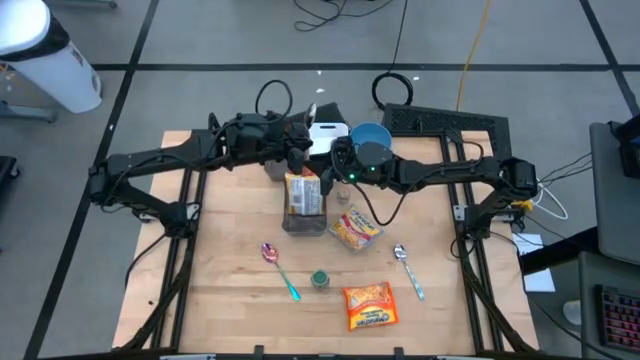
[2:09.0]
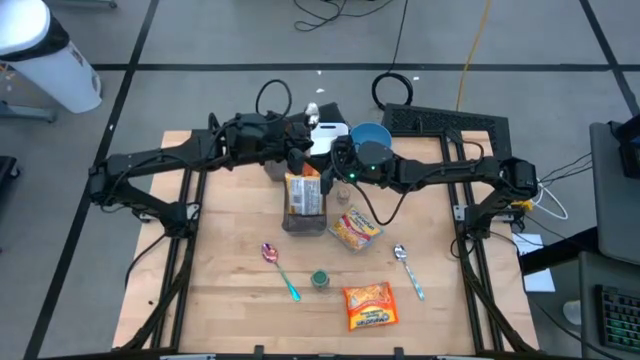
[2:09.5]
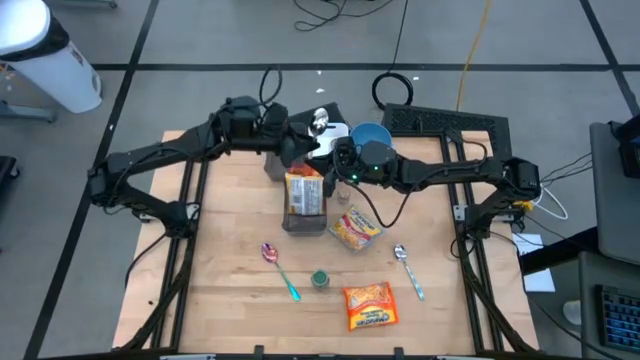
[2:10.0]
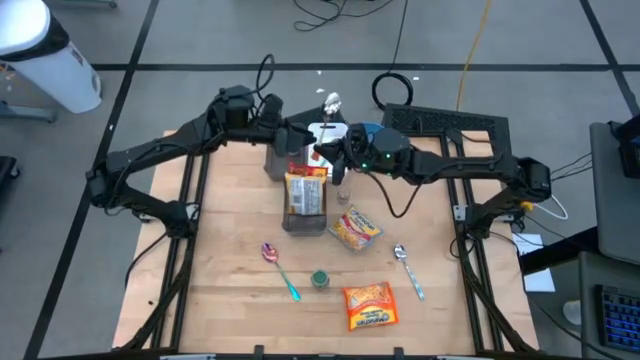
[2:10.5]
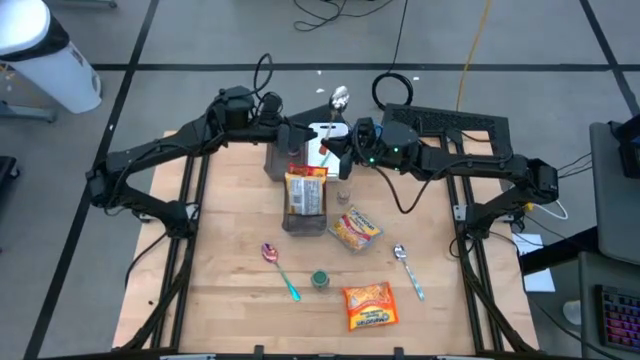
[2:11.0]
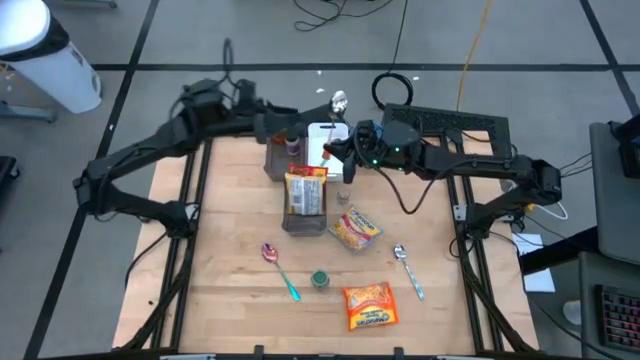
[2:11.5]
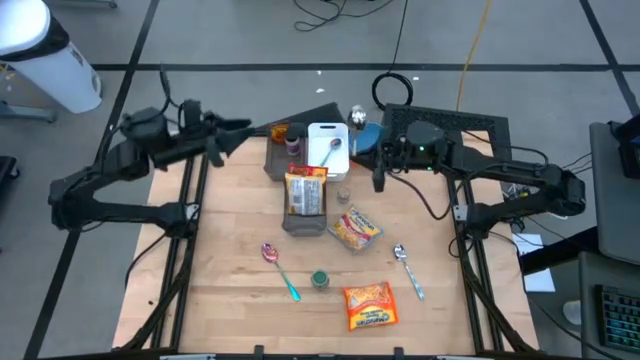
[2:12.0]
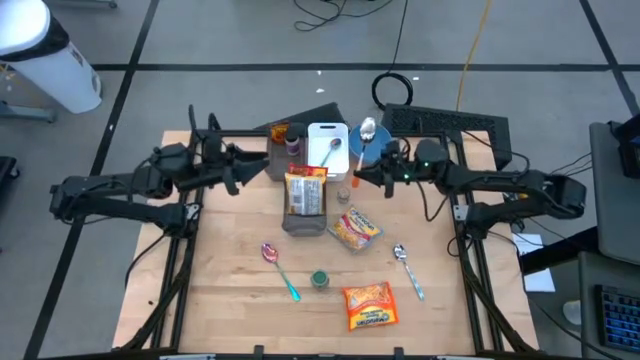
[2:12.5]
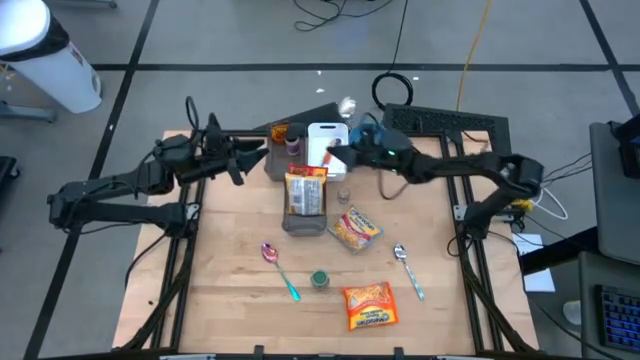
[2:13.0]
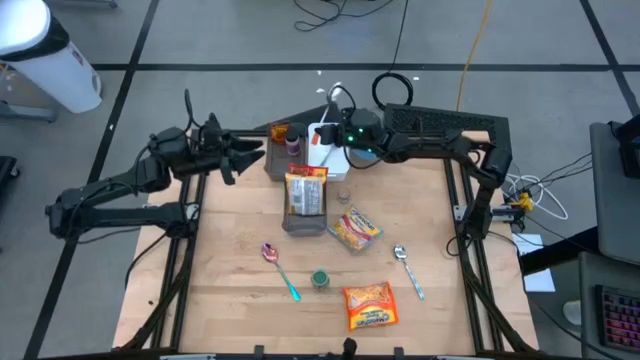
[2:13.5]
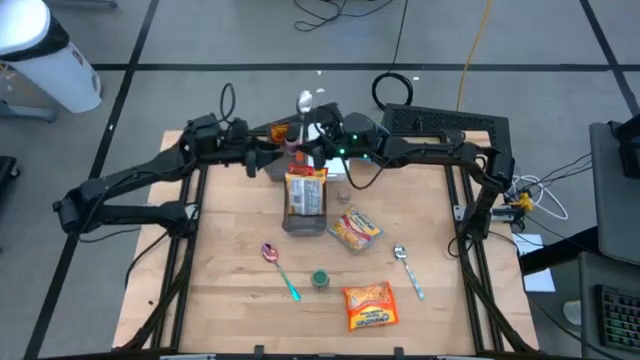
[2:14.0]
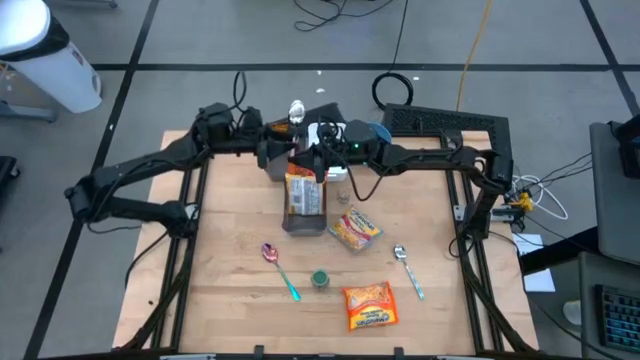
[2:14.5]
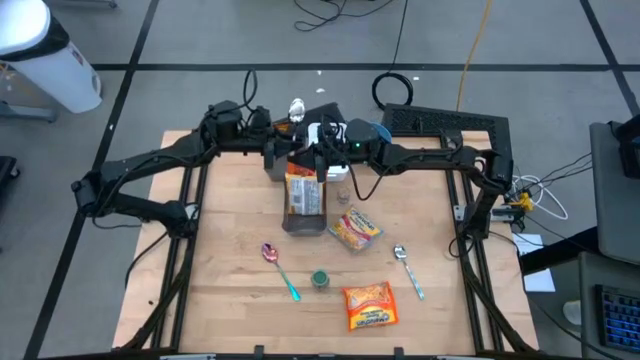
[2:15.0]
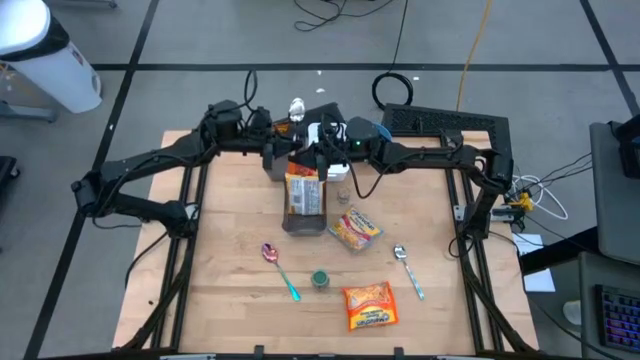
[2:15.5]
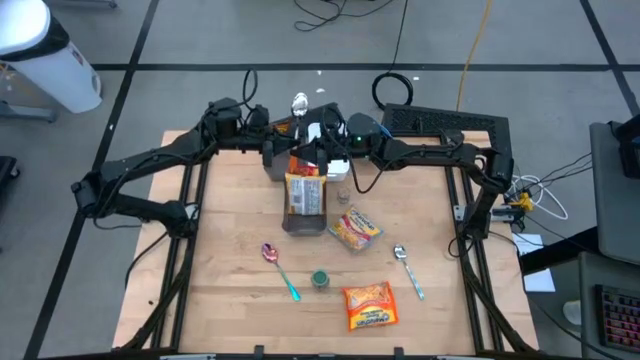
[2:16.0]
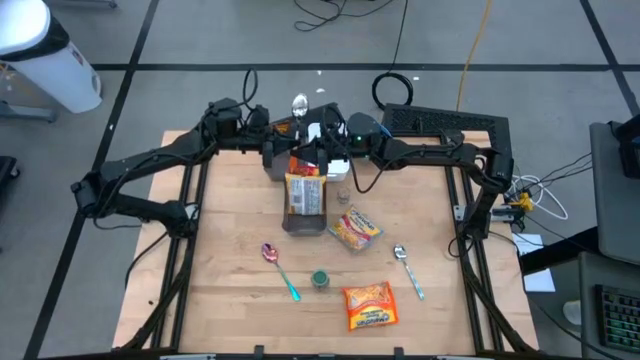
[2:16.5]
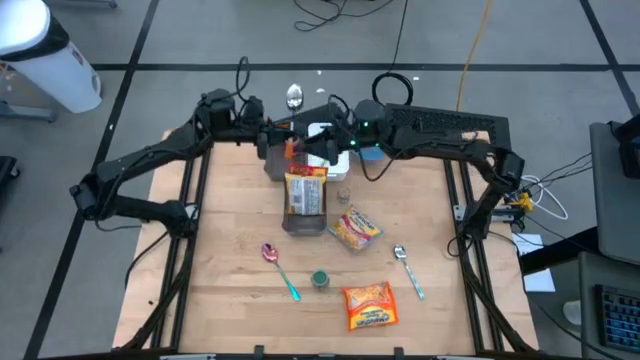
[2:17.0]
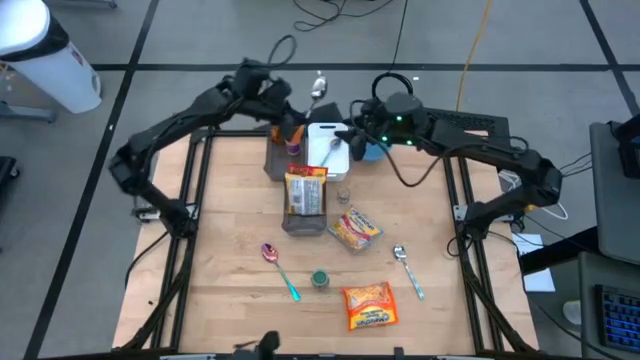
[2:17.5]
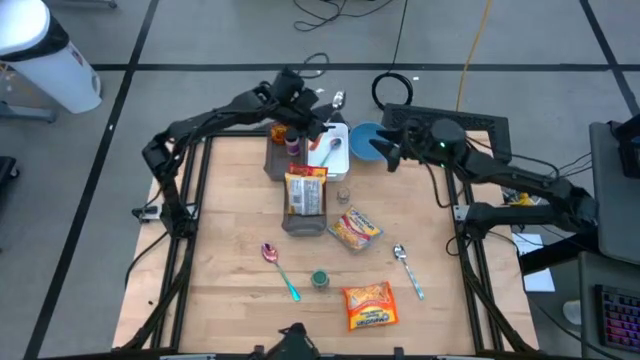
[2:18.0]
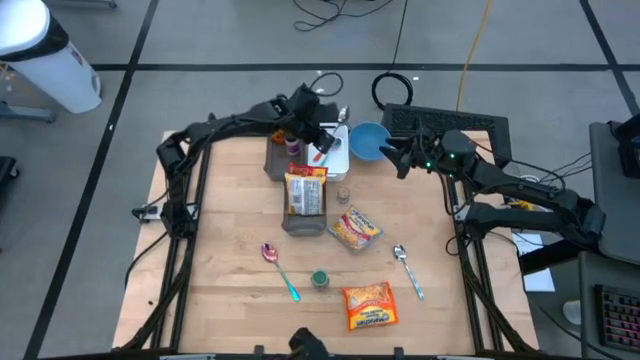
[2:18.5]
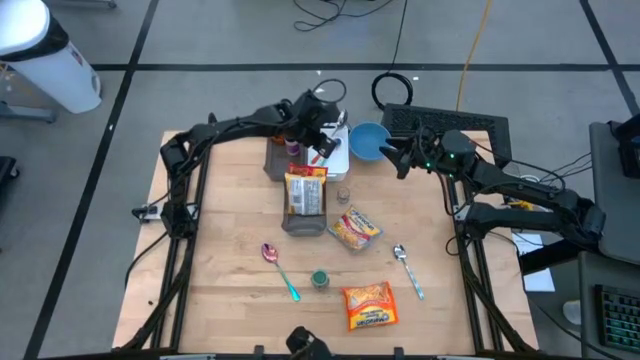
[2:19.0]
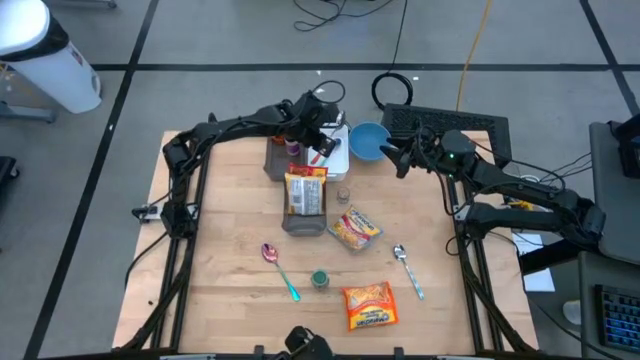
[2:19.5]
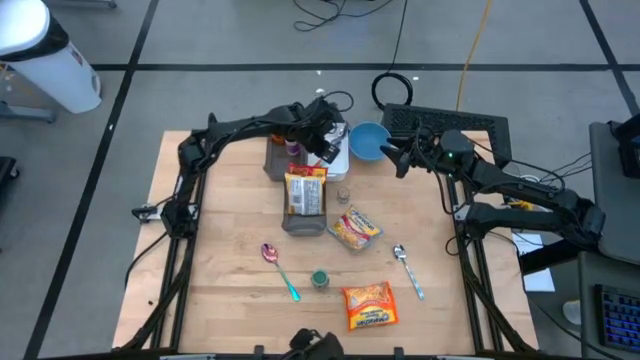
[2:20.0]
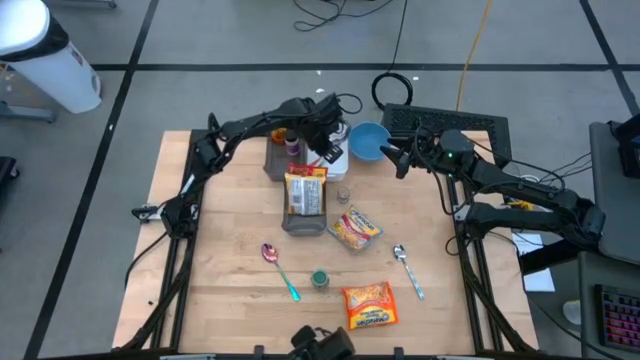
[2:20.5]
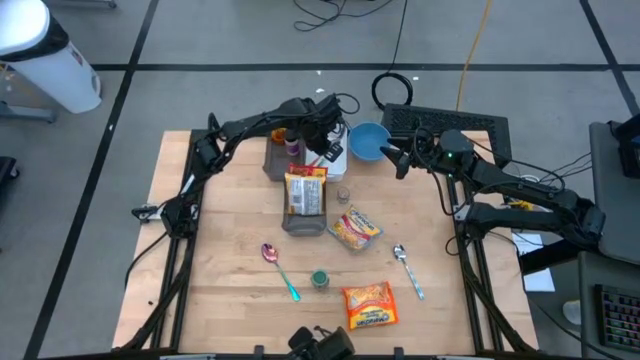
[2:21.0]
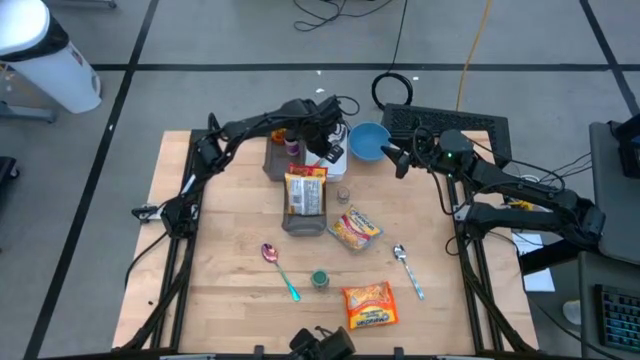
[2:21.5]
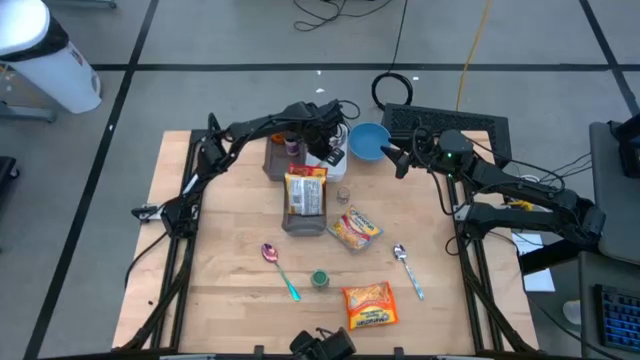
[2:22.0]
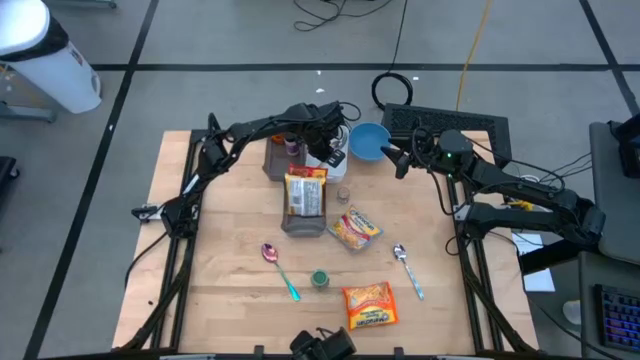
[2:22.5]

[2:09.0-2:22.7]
Task: Pick & Place Food Item
Put the orange spoon into the white bin

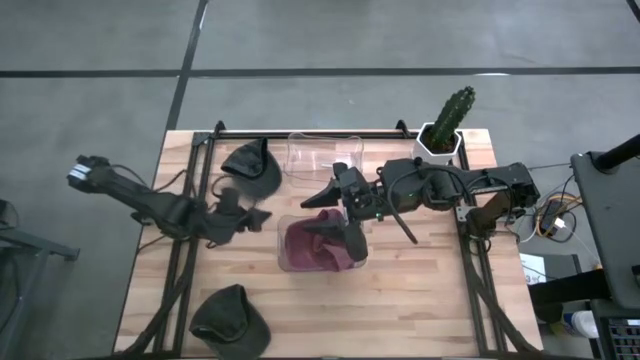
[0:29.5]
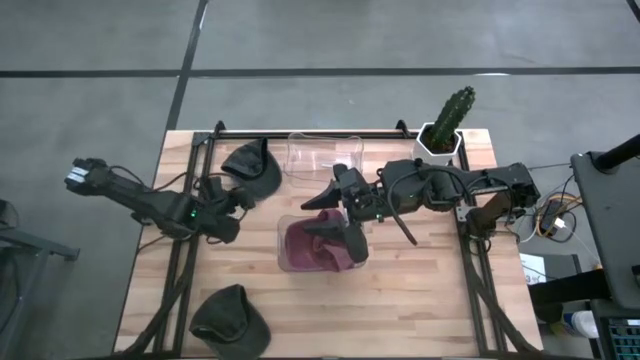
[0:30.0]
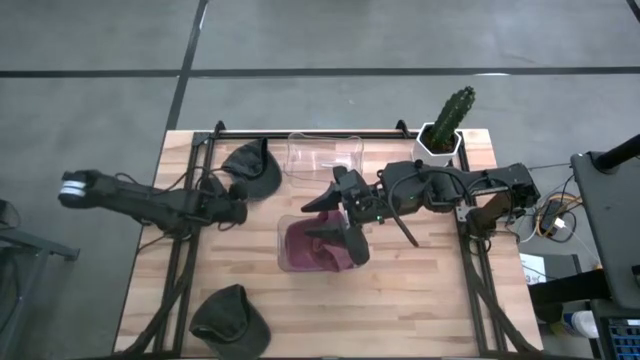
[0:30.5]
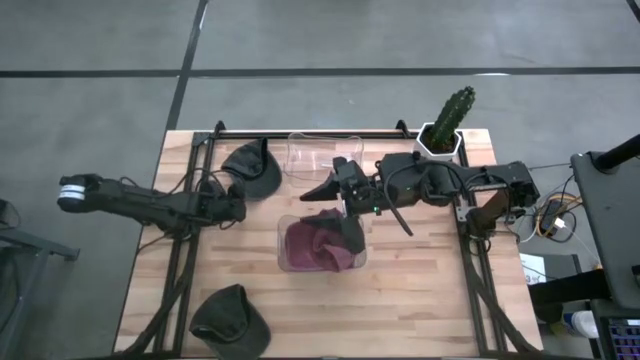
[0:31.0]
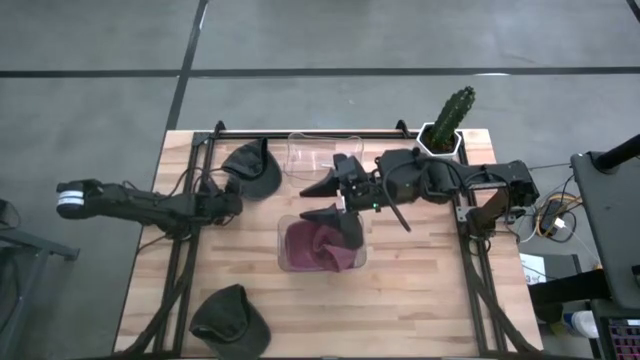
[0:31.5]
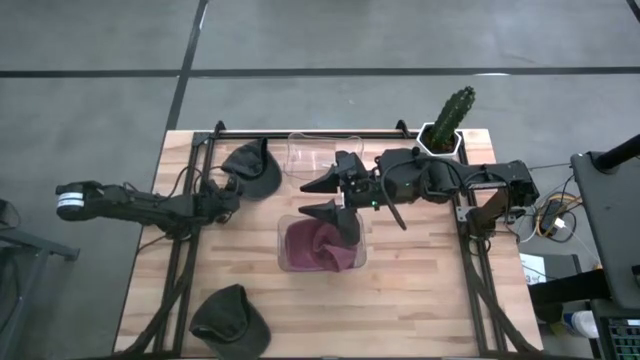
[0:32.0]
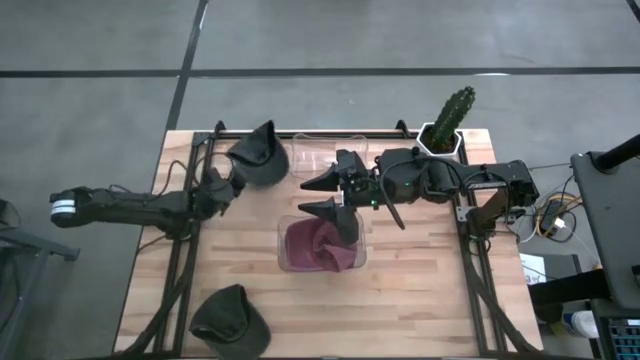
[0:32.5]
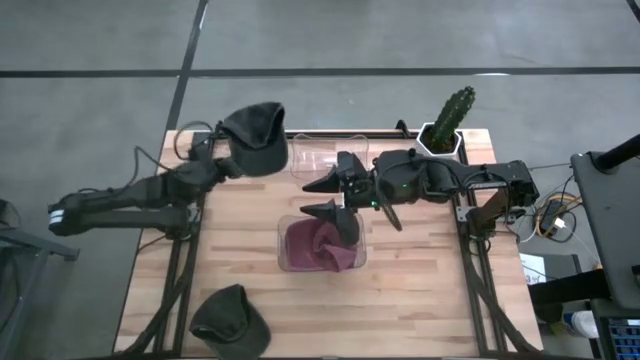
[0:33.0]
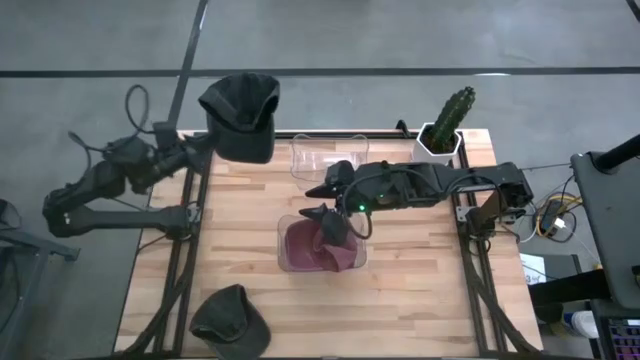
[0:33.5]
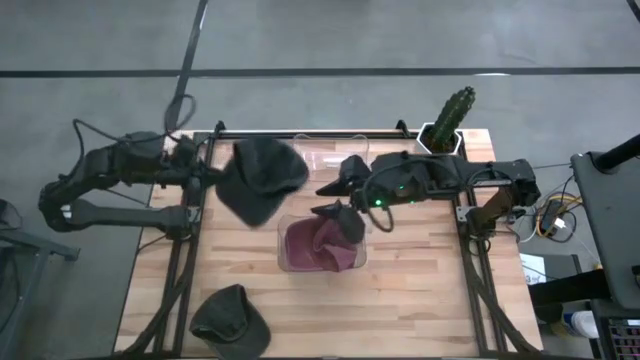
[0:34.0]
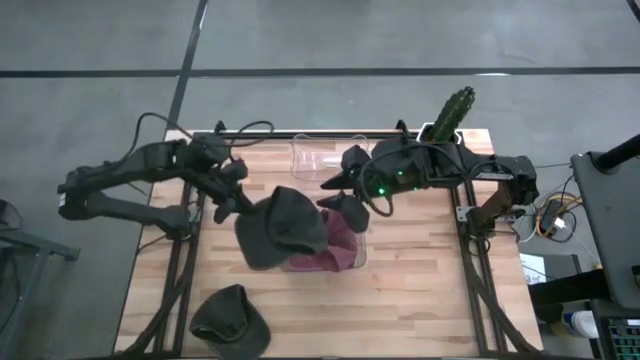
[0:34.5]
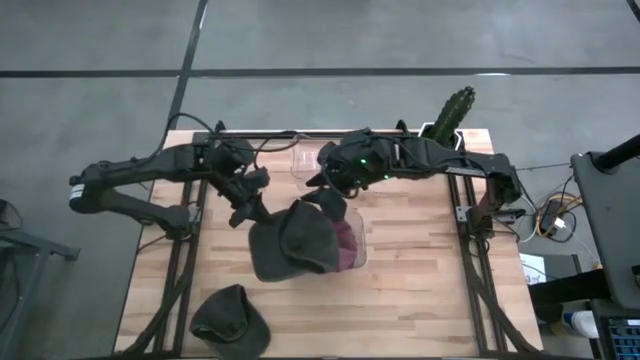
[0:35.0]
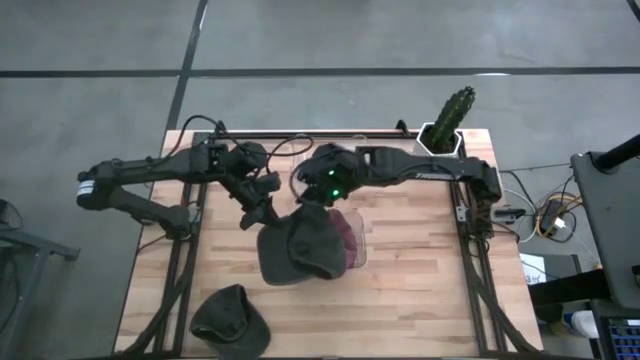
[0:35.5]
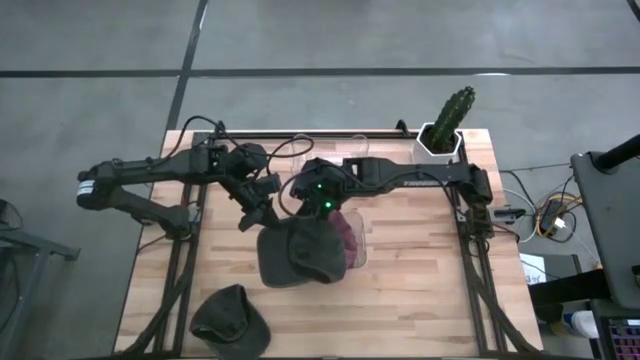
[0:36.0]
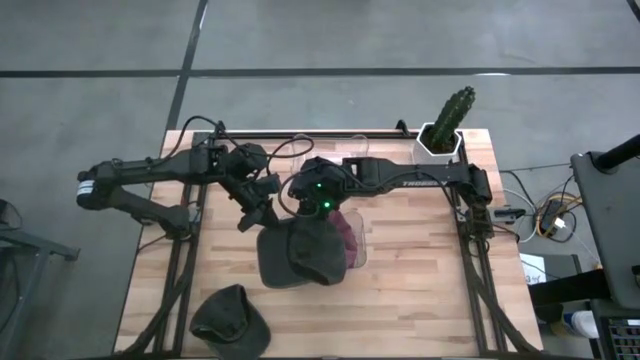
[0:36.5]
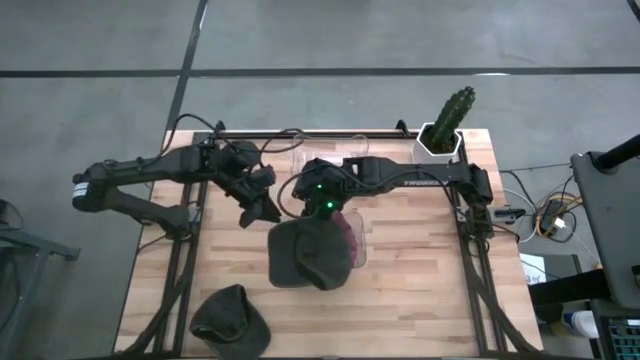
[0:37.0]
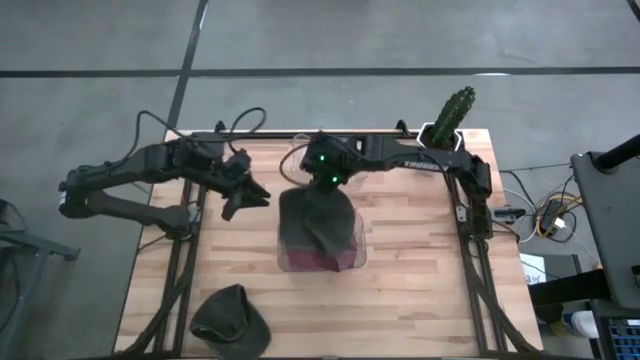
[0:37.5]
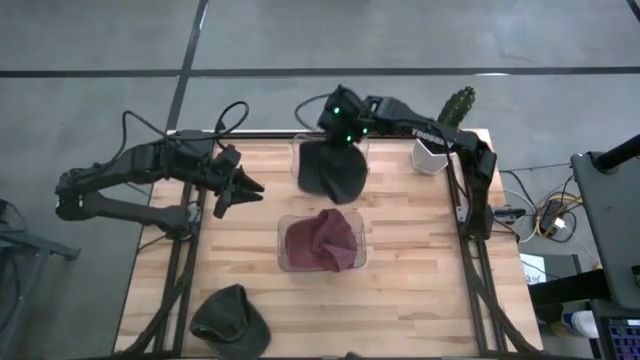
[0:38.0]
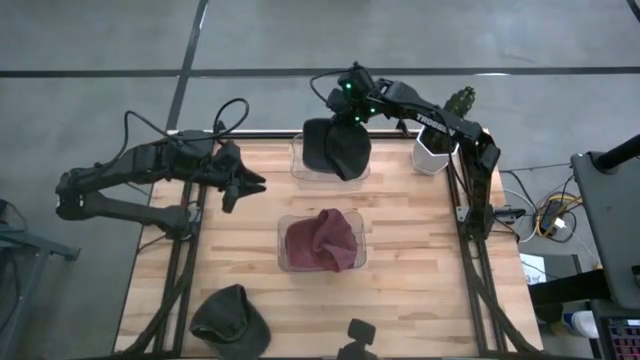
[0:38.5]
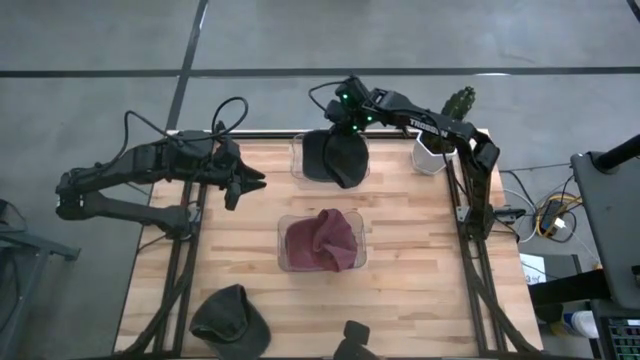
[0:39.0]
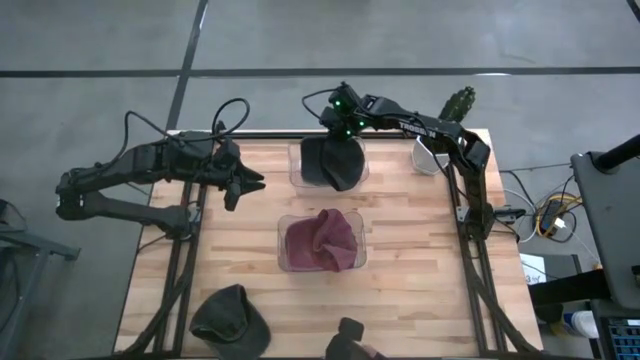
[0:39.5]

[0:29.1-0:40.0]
Task: Pick & Place hat
Put the top black cap into the top transparent bin
